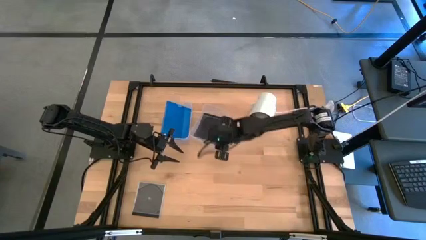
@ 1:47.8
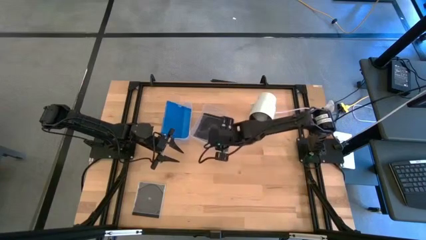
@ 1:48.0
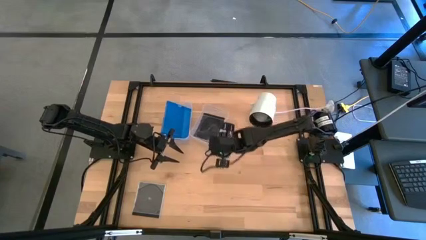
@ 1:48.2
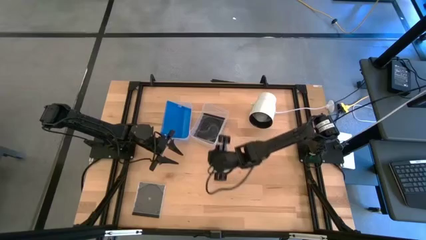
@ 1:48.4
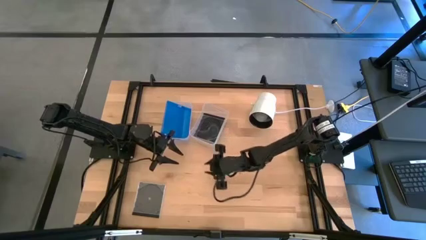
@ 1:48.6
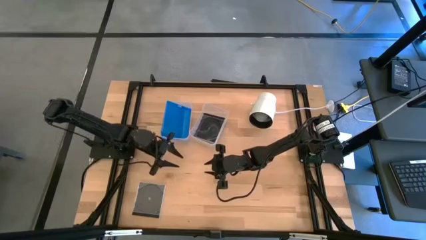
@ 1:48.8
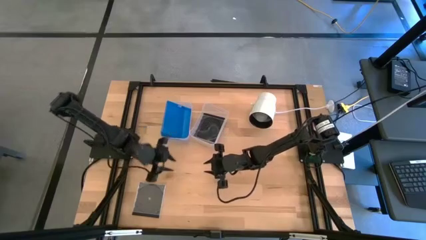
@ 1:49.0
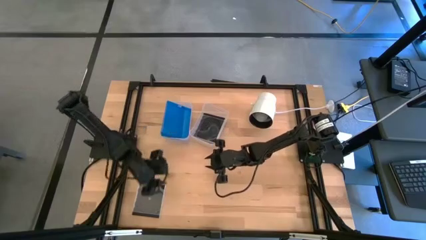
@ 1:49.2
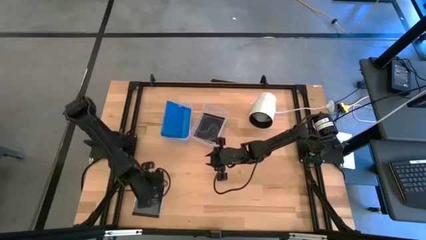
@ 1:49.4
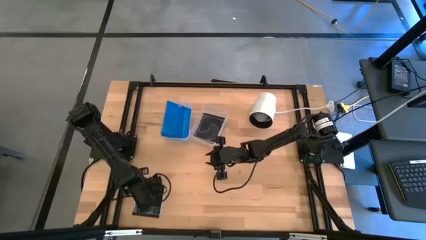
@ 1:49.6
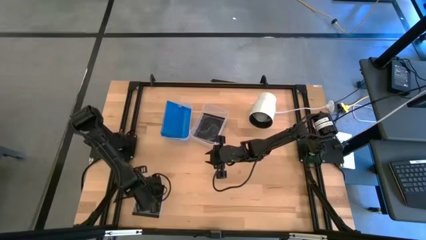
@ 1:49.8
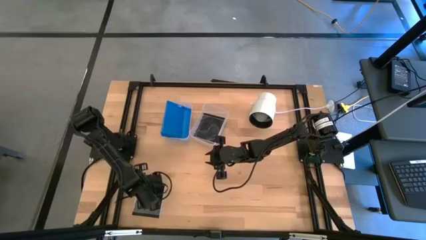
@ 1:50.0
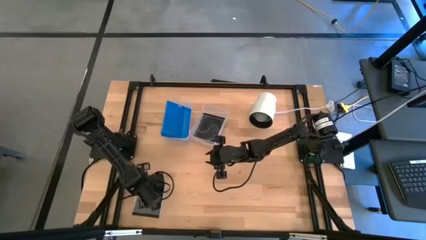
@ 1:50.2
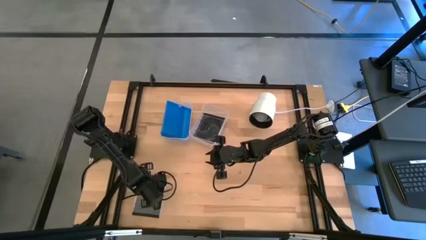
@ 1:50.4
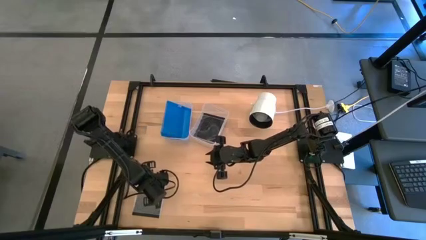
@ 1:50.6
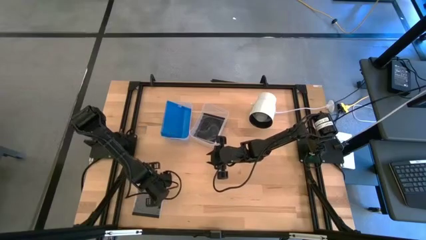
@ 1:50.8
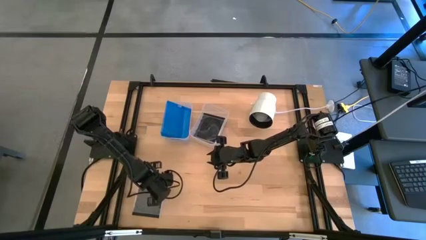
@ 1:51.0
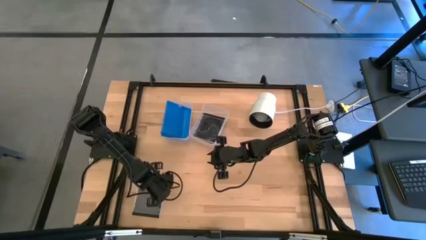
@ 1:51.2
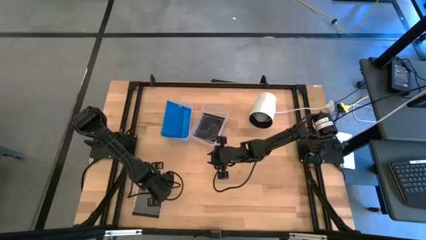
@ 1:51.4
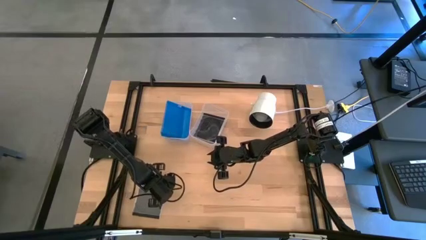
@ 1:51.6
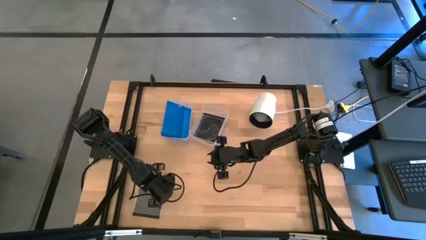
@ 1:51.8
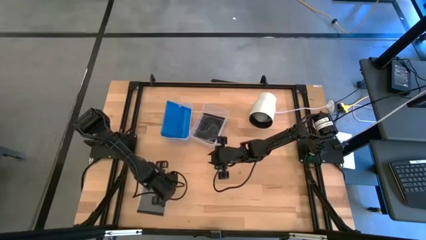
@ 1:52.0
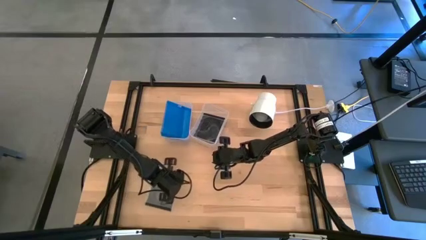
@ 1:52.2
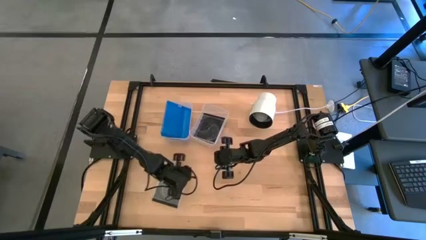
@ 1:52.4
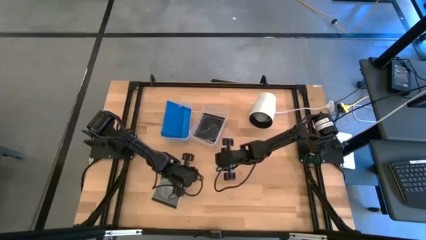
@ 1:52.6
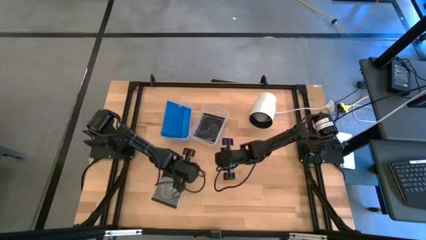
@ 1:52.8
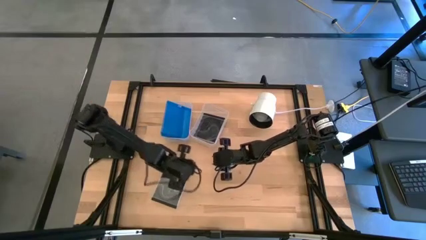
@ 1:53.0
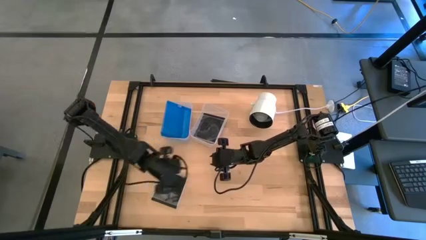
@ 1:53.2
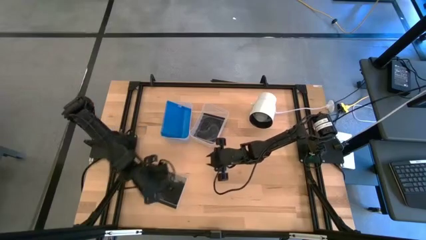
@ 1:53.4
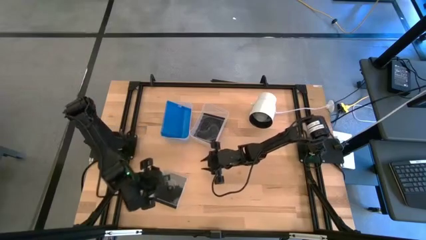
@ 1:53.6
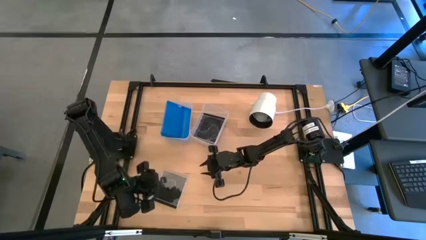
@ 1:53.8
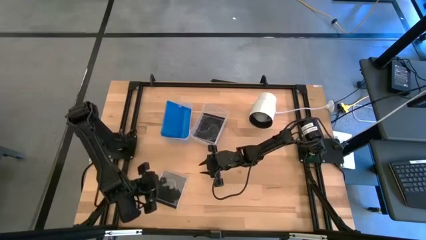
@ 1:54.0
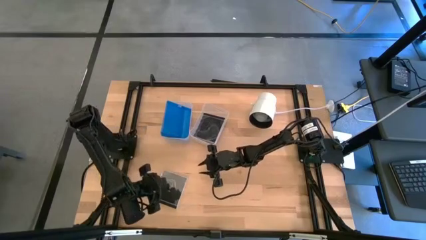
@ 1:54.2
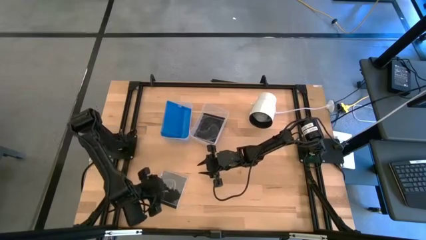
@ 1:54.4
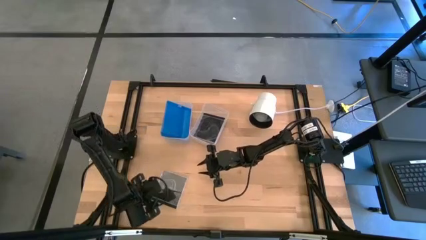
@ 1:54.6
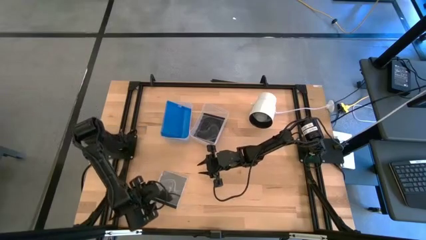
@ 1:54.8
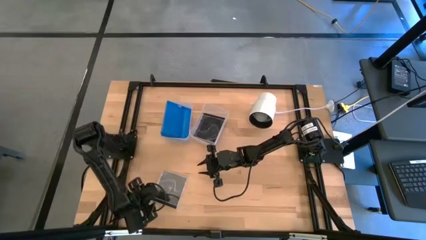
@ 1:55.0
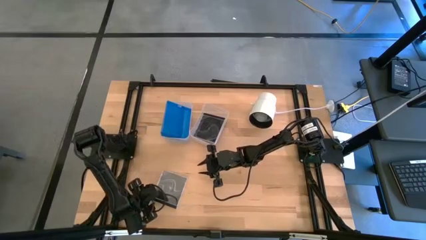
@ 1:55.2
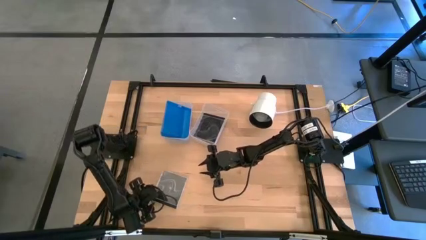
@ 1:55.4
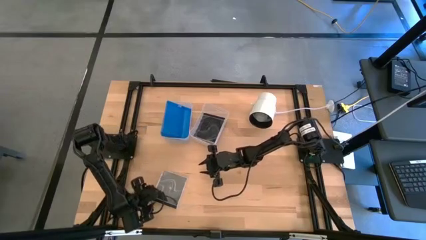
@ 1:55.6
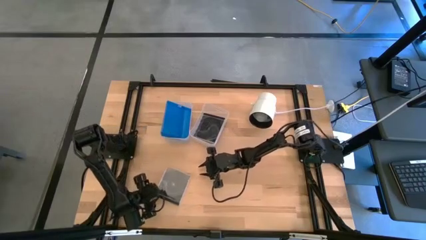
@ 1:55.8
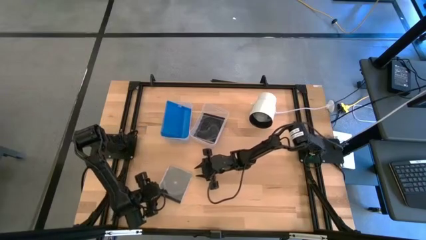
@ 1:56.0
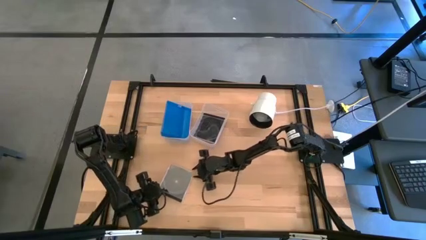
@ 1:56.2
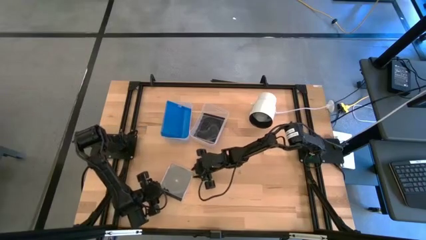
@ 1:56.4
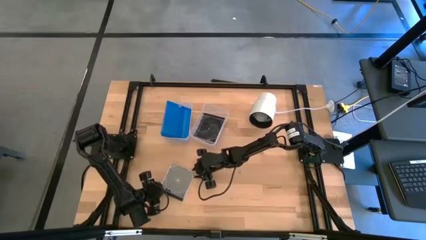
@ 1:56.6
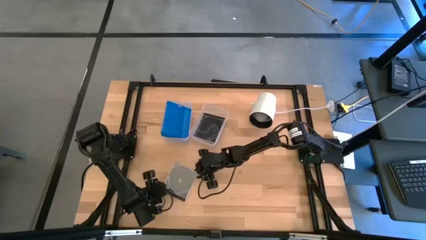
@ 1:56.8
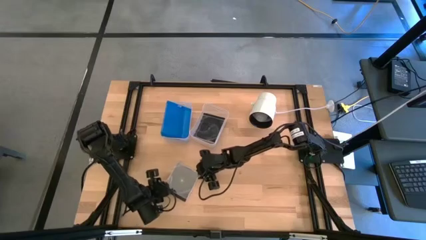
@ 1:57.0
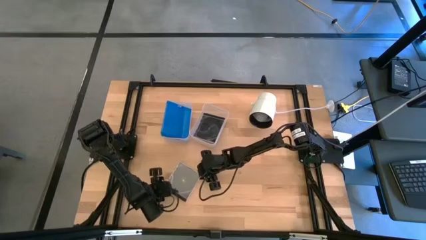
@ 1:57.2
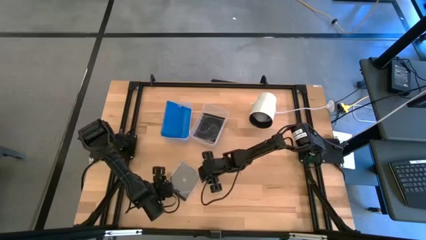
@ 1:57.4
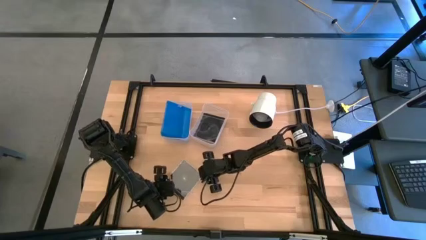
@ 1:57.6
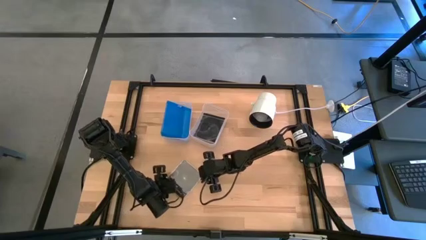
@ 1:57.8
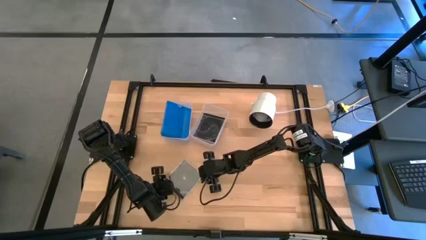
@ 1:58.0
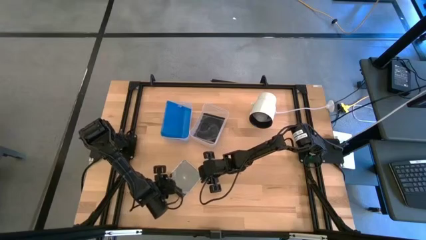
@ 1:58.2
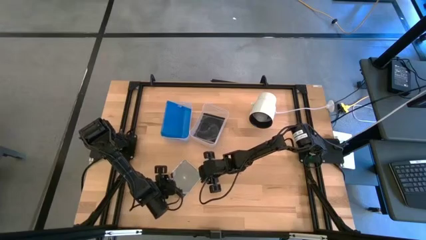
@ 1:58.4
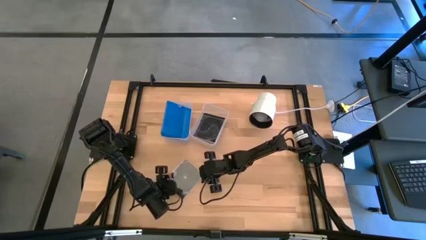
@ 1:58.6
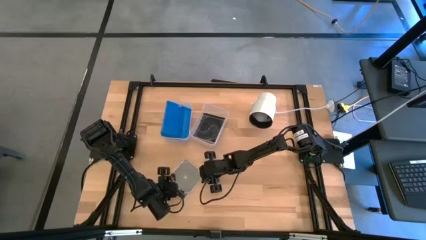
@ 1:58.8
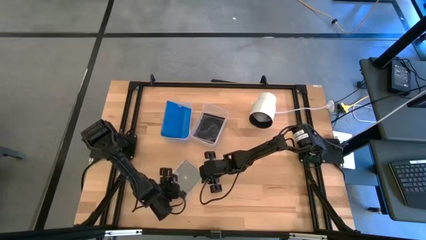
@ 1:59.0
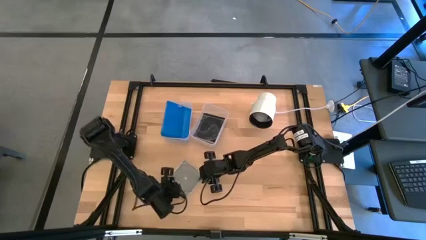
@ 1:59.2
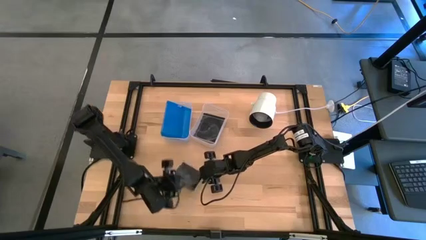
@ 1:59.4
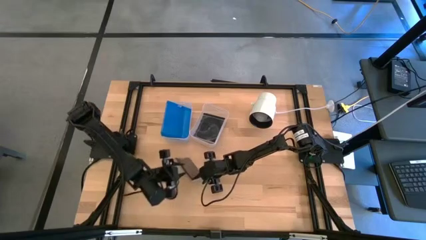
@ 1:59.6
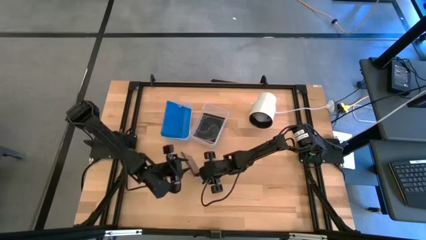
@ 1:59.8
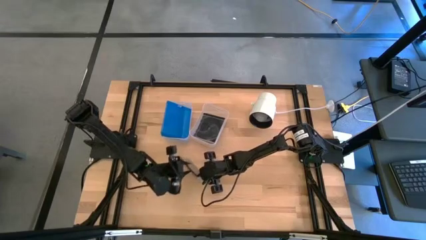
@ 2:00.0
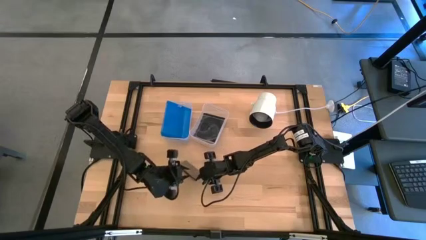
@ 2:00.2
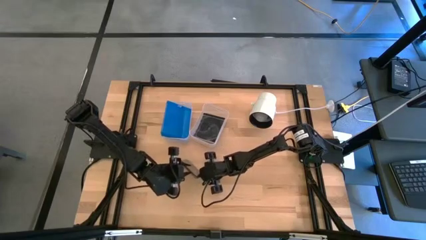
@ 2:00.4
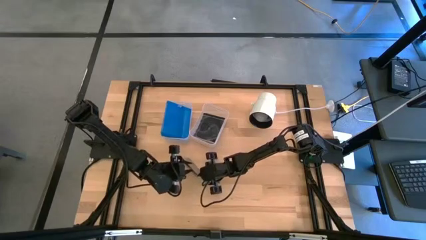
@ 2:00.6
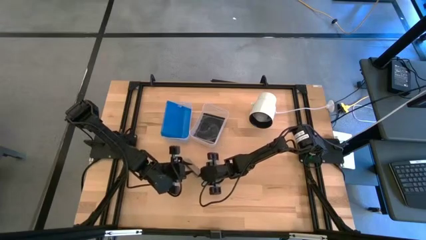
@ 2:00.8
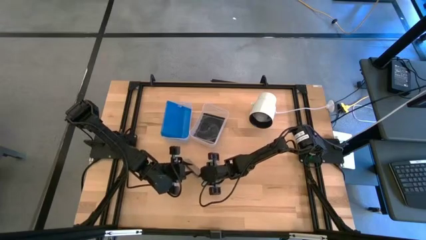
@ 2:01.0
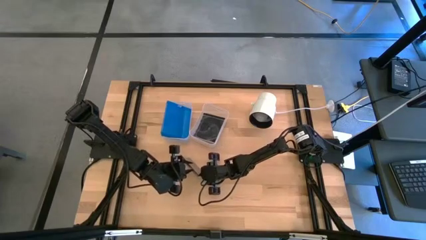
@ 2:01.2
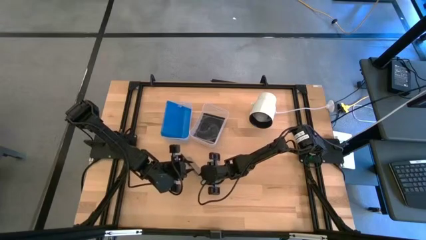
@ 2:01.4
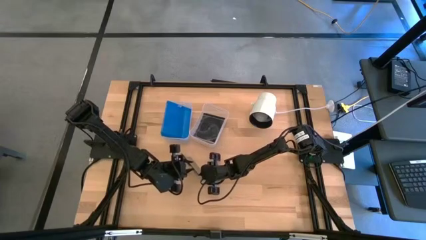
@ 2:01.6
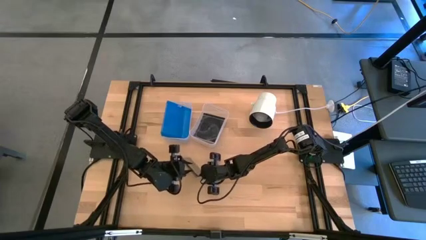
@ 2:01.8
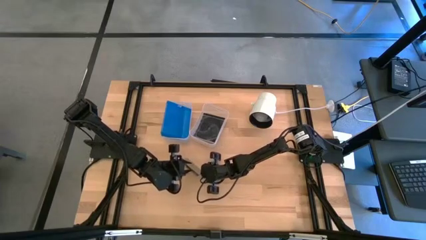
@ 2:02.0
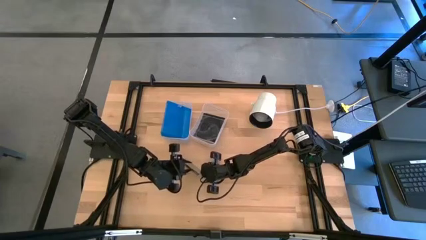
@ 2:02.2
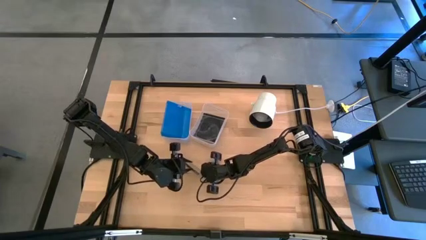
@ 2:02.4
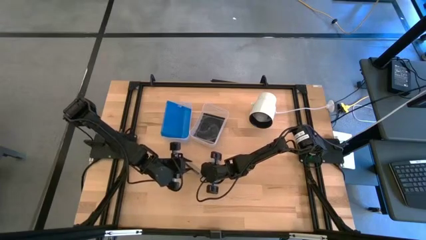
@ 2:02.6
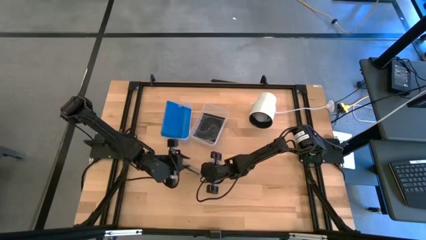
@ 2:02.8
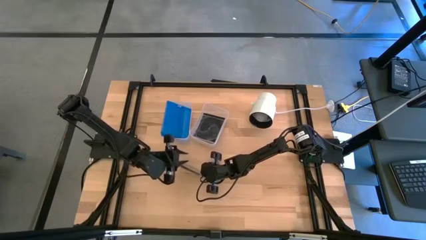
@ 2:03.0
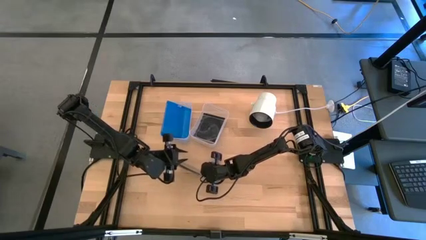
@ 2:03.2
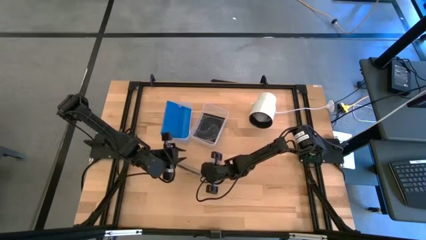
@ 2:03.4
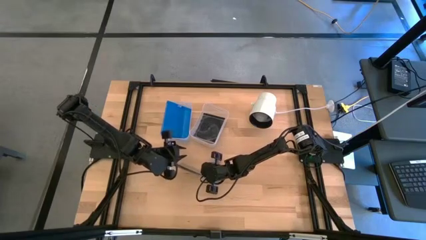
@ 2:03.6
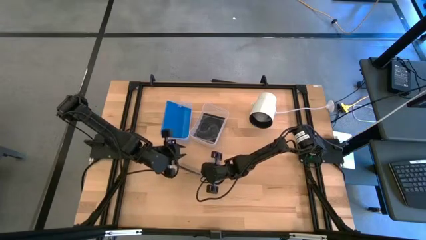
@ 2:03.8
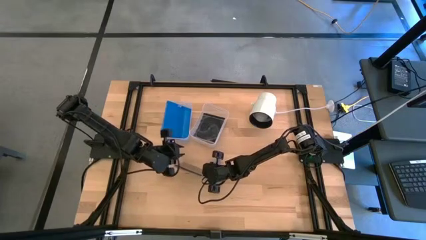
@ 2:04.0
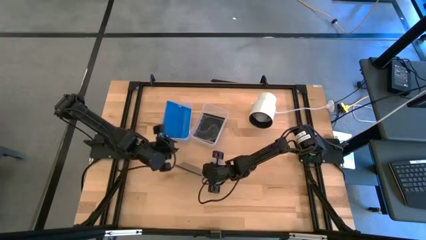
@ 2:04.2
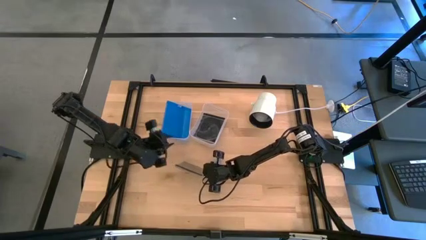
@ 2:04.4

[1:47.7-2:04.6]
Task: Pick & place jewel cases by type
Put the black cd case into the right transparent bin
